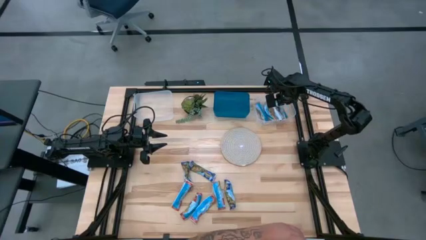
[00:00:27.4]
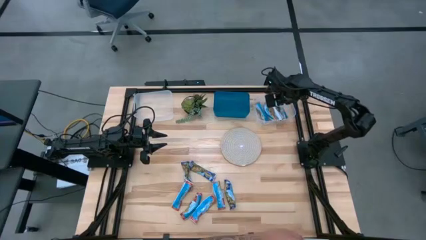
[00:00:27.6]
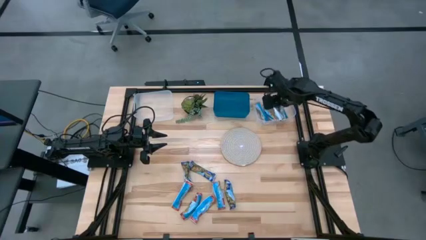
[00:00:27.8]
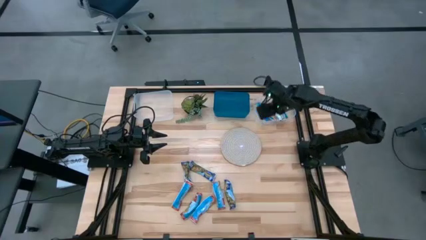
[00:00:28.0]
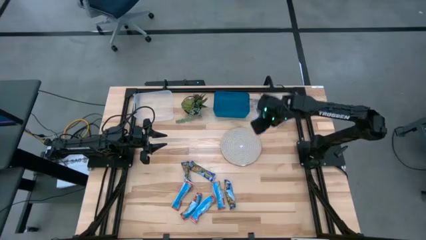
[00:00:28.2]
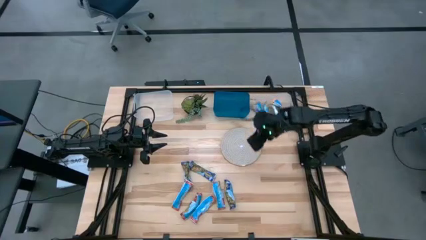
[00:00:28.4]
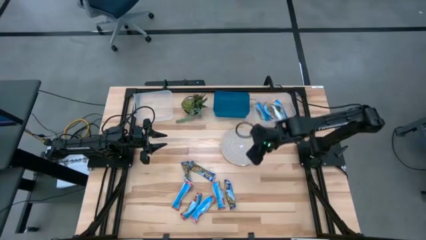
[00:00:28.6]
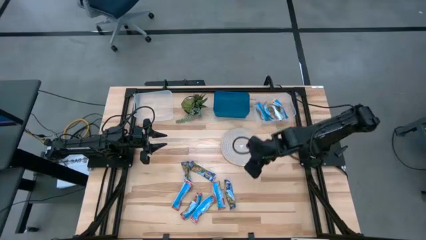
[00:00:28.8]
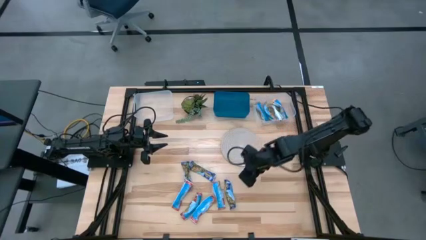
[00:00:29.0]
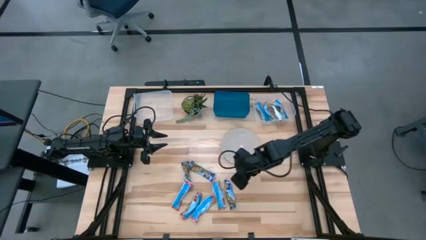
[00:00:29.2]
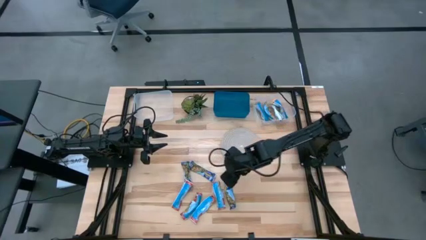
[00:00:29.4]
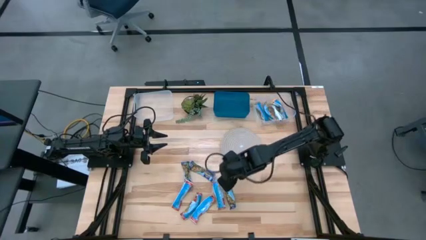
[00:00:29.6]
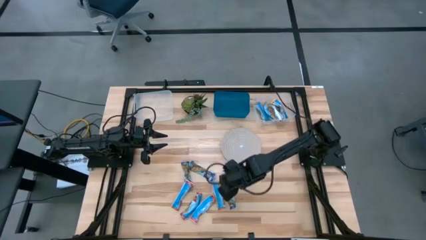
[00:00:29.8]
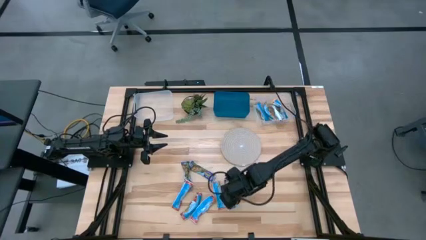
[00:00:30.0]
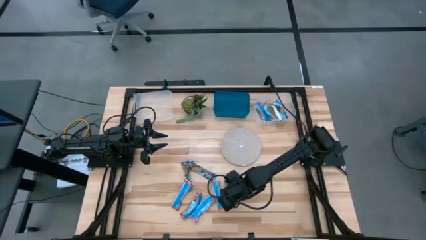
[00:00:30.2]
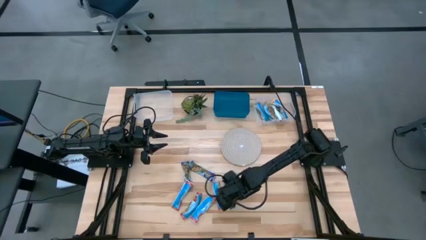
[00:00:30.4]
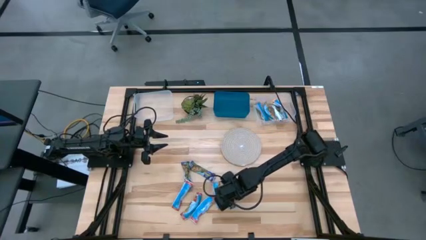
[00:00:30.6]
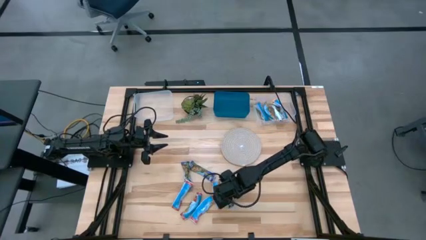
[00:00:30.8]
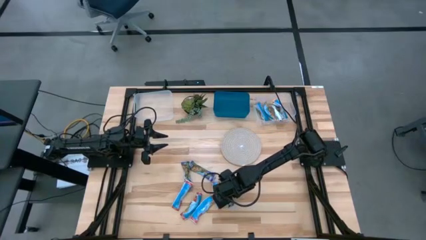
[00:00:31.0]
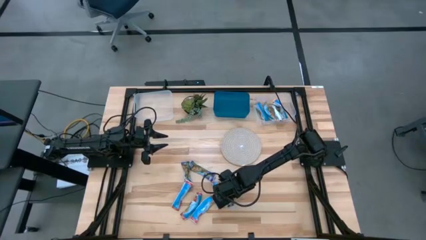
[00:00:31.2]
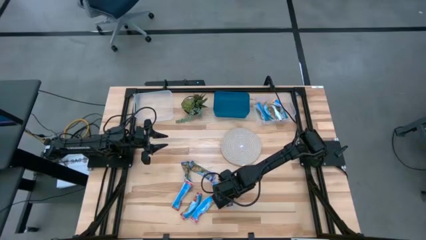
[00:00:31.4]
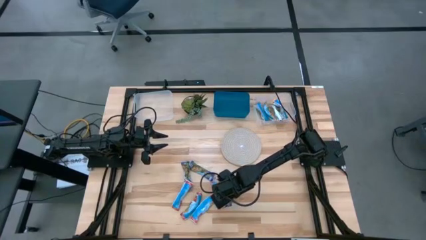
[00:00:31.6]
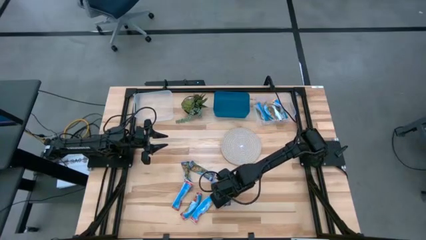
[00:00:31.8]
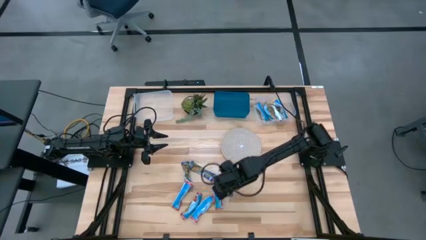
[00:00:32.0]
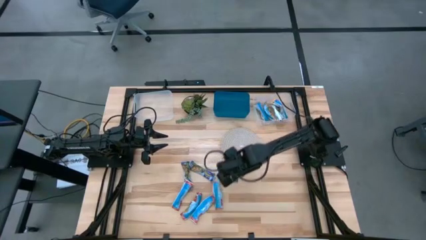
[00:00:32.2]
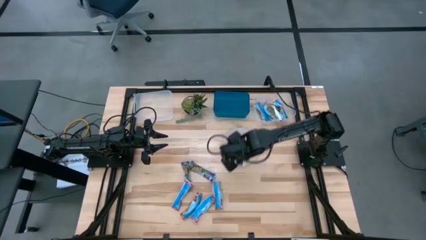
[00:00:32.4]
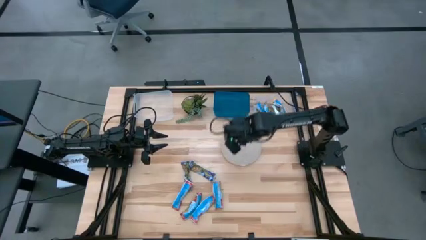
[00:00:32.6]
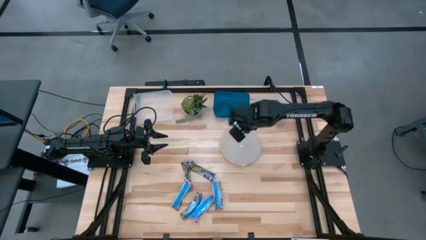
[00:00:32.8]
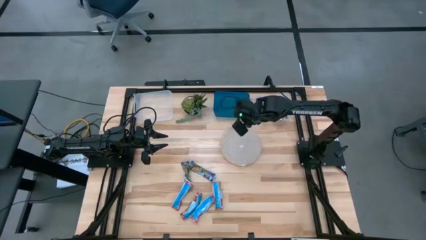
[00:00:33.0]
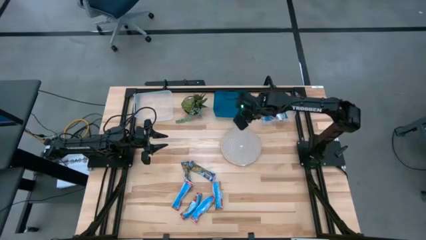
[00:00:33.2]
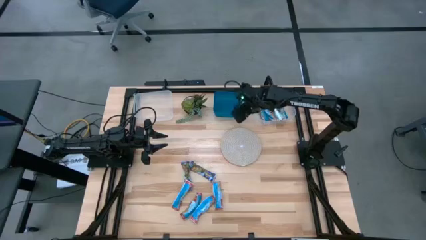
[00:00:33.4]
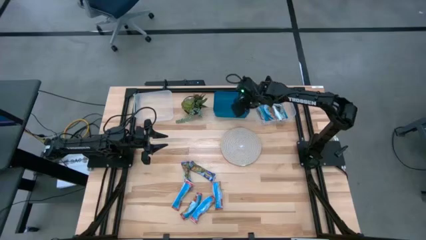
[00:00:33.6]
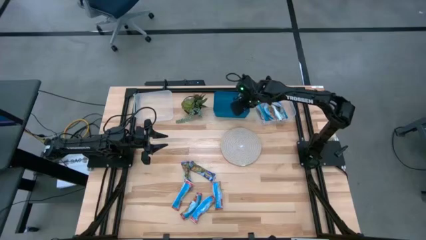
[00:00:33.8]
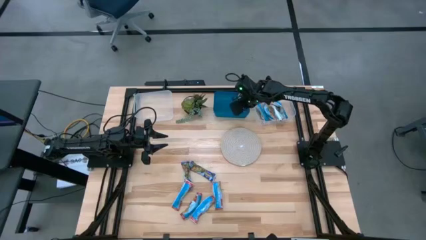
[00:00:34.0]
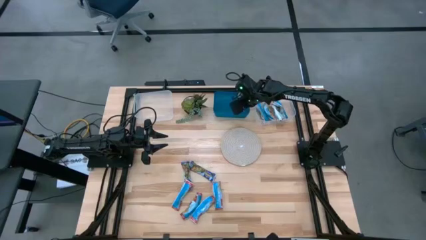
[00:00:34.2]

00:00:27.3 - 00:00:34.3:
Task: Pick and place Granola Bars by type
Put the blue granola bar into the blue bin

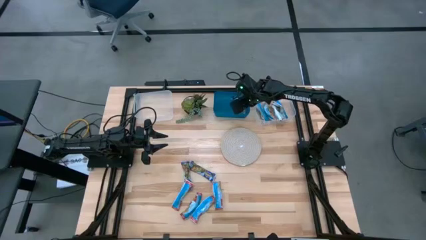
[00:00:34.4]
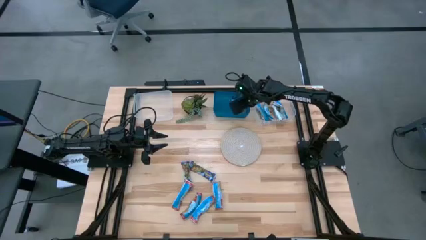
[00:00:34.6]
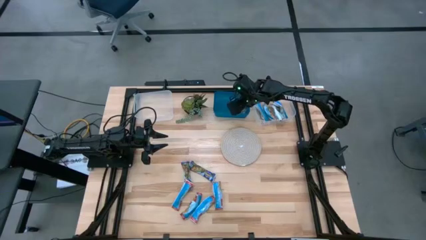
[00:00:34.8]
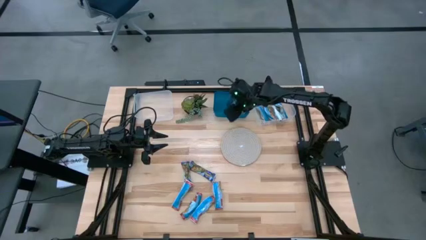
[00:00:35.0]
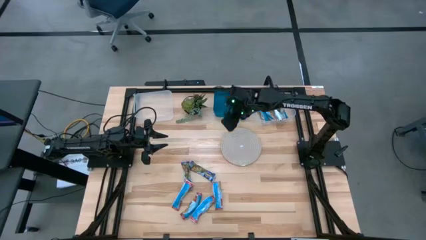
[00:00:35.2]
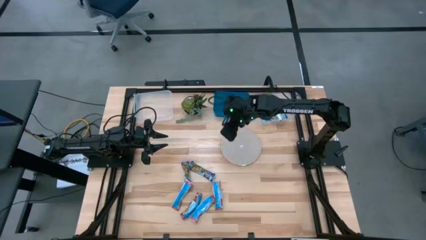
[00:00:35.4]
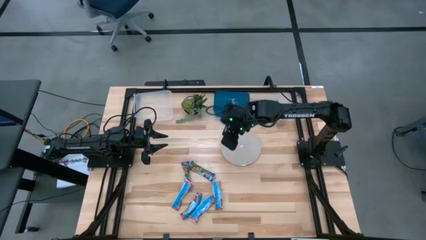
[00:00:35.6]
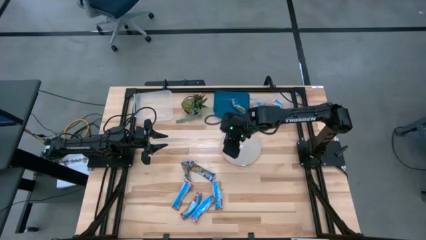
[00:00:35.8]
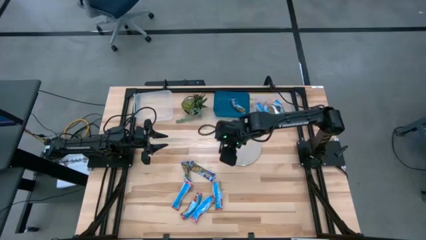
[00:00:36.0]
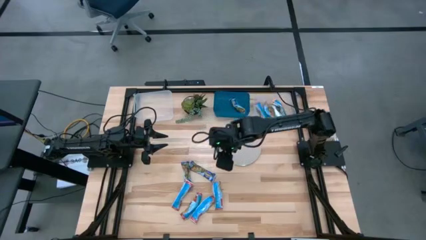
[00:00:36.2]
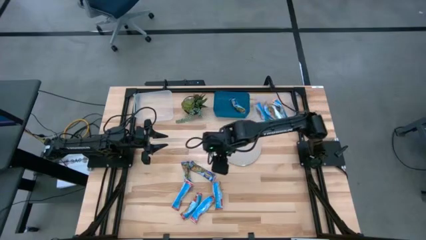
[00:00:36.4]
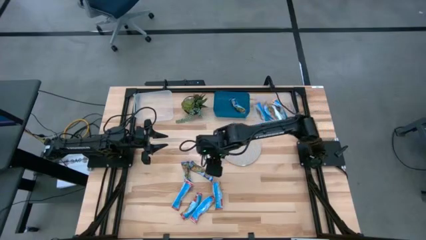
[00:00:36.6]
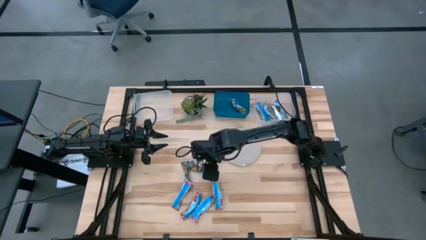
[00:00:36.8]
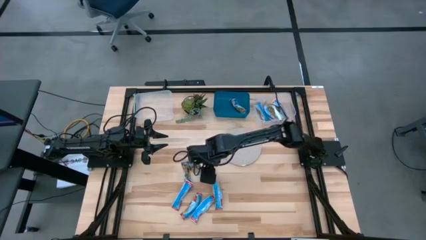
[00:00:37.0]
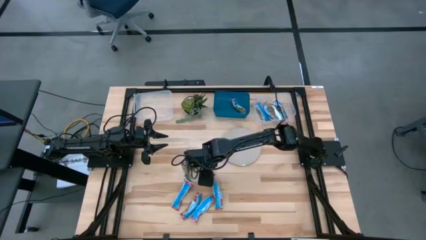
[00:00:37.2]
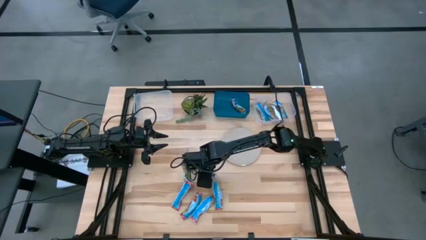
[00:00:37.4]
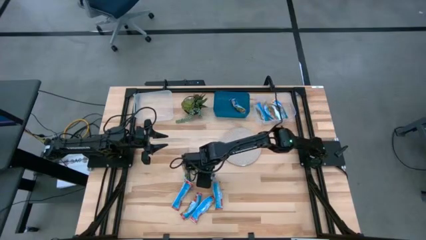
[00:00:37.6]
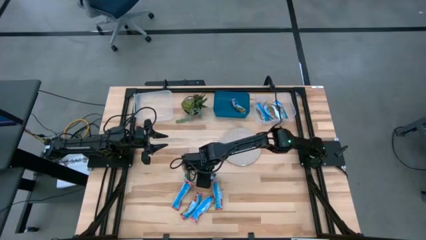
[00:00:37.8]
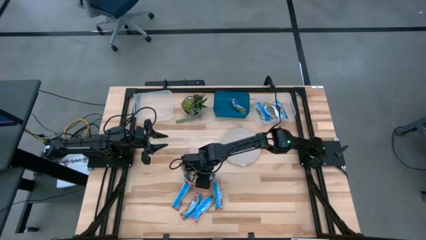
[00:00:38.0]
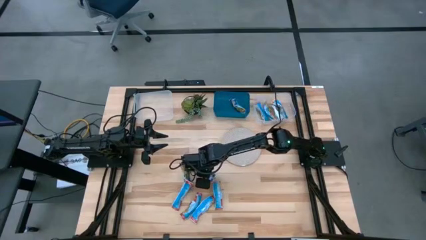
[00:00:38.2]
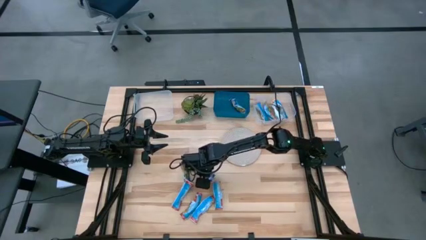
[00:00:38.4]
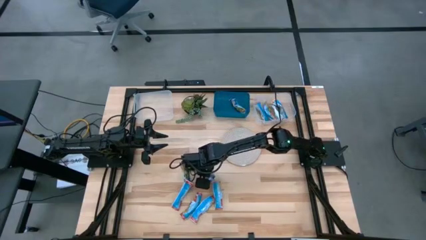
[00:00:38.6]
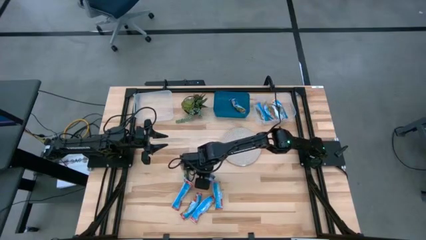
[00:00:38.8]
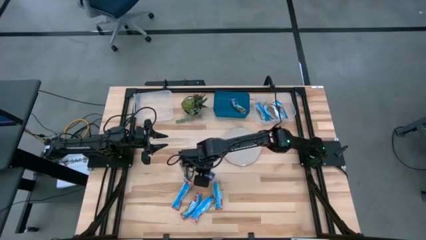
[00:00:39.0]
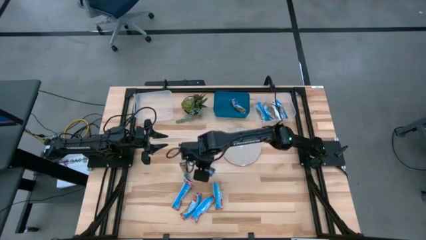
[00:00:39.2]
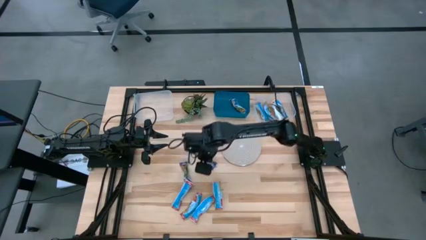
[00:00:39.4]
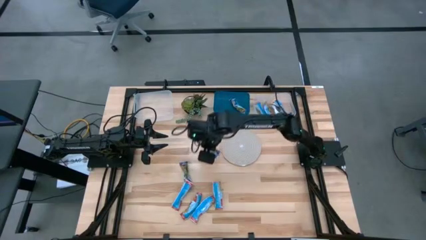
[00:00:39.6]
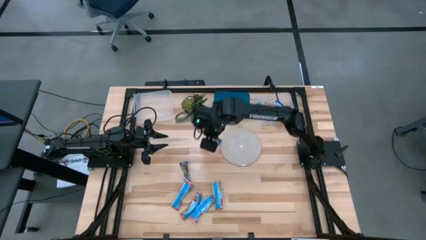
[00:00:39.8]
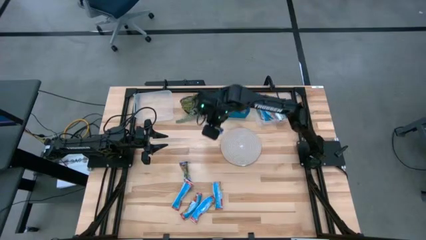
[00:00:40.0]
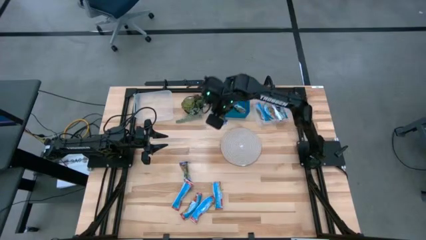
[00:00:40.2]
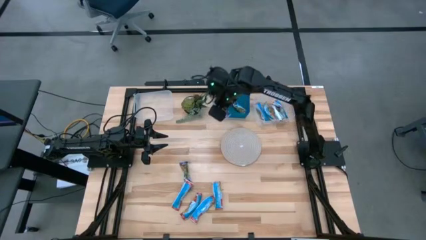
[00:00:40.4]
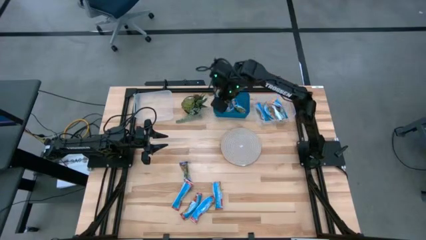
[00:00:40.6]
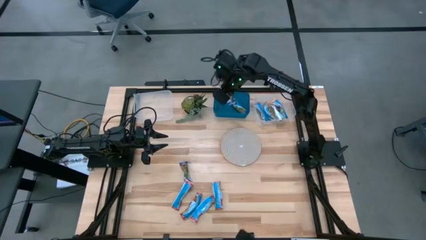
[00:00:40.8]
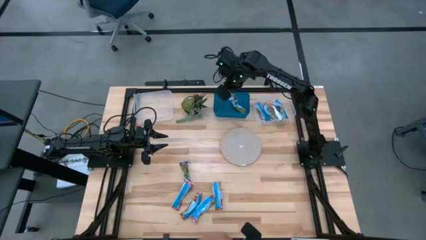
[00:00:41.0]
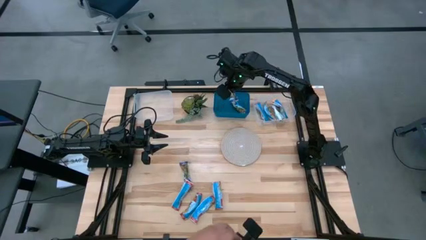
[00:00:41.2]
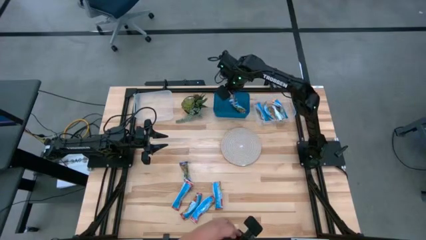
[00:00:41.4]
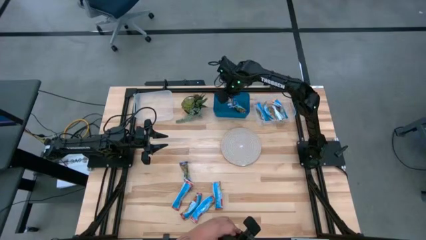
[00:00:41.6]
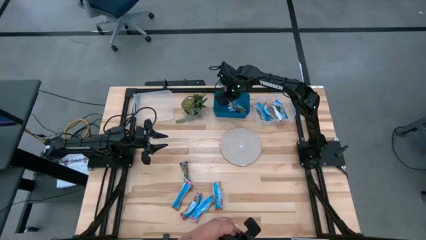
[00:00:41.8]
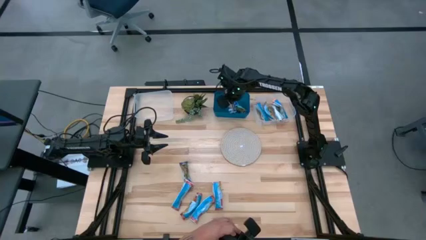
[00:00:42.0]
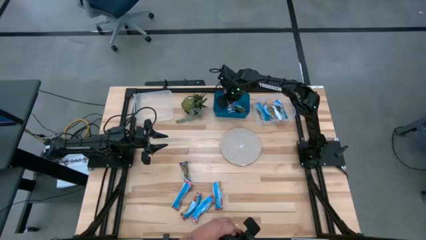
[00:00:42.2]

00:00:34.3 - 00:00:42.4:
Put the blue granola bar into the blue bin
